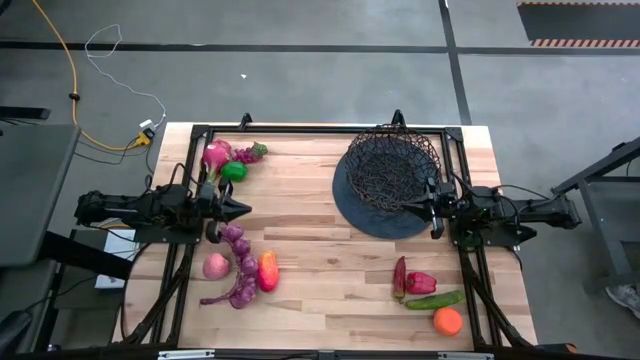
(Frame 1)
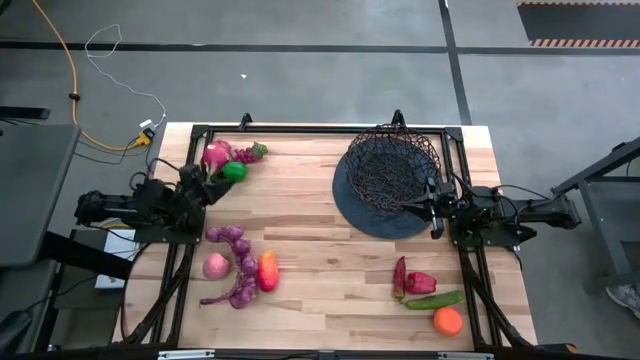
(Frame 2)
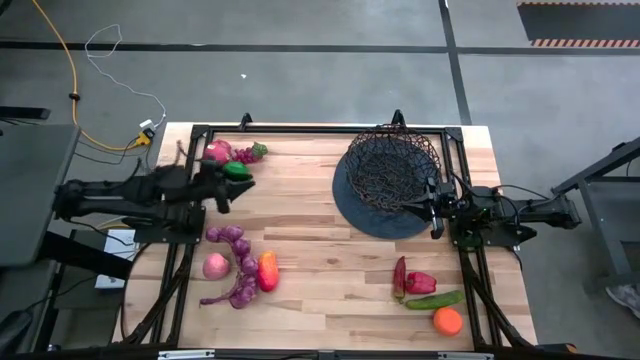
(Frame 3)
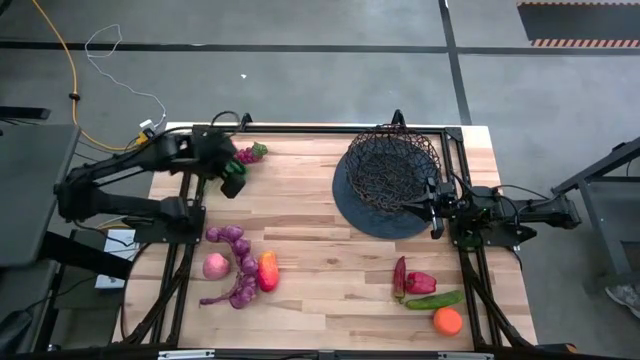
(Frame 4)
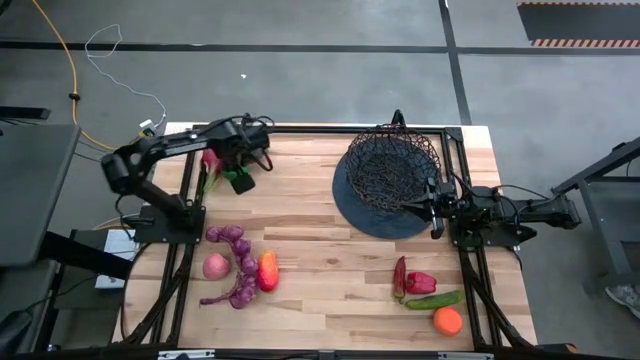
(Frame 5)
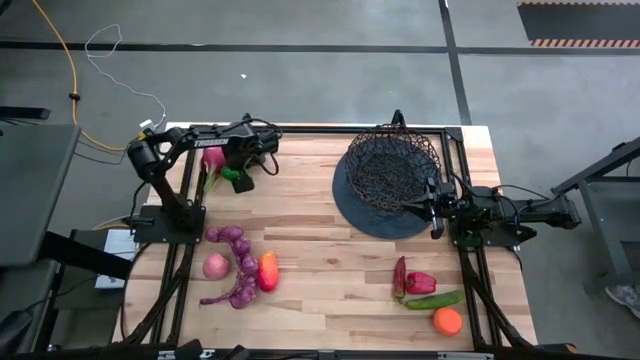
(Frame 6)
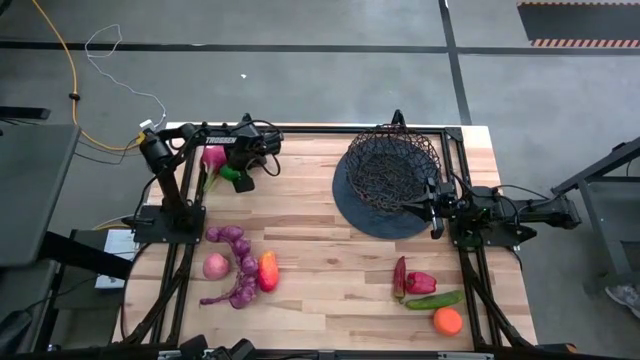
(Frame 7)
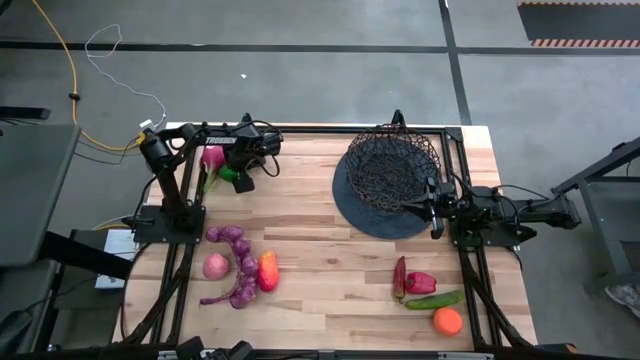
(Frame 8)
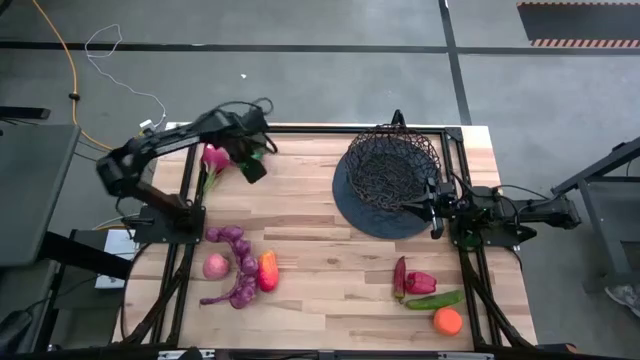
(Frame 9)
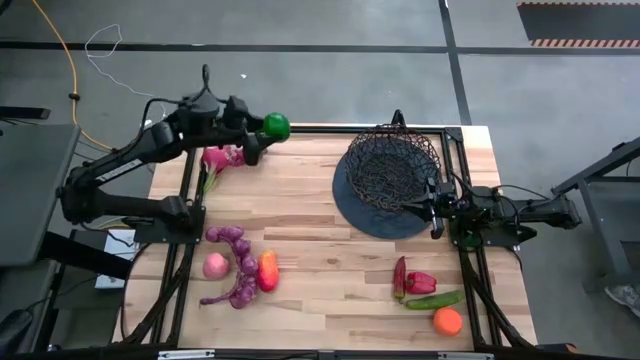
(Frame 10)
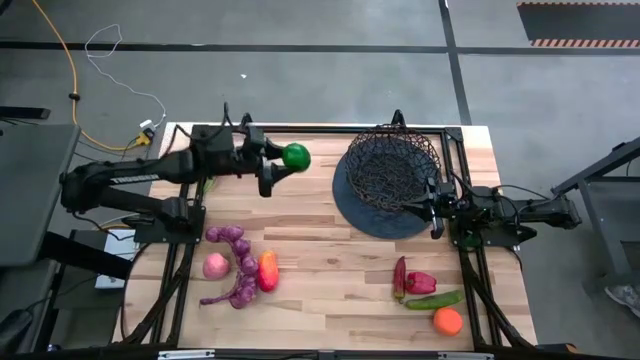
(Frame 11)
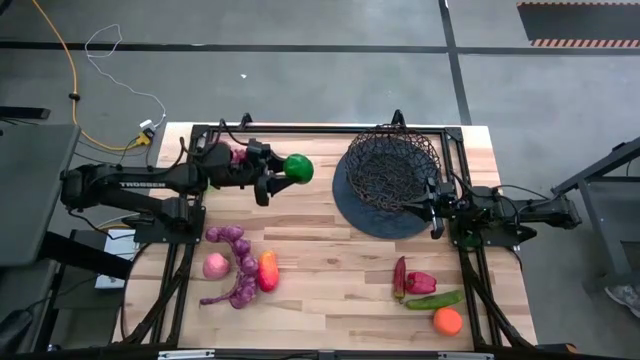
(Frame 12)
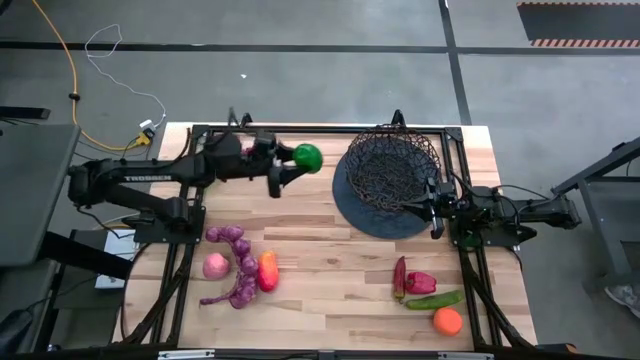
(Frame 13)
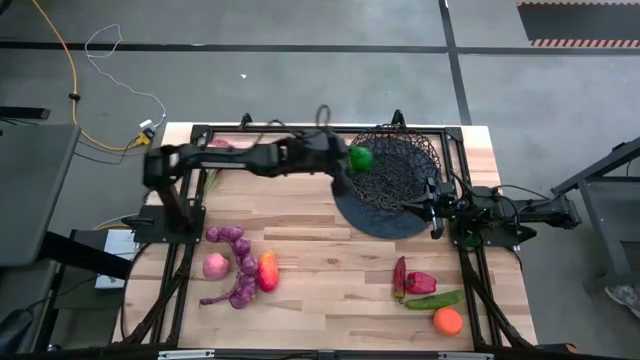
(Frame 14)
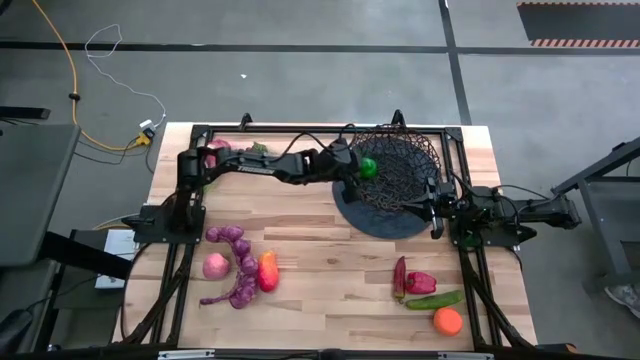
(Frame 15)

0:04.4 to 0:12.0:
Task: Build produce basket
Put the lime into the wire basket

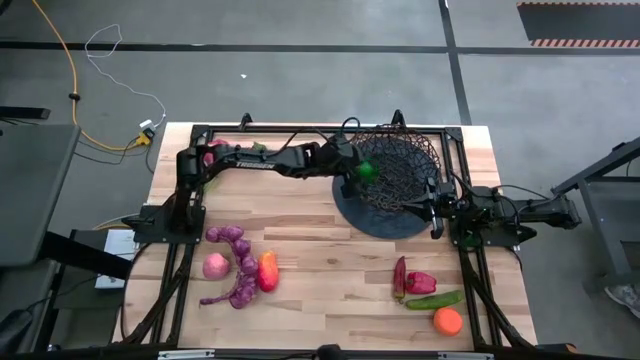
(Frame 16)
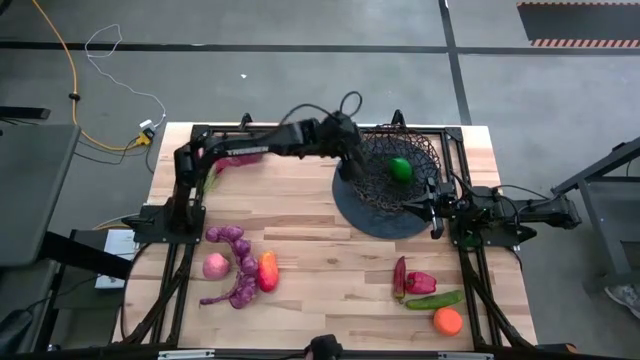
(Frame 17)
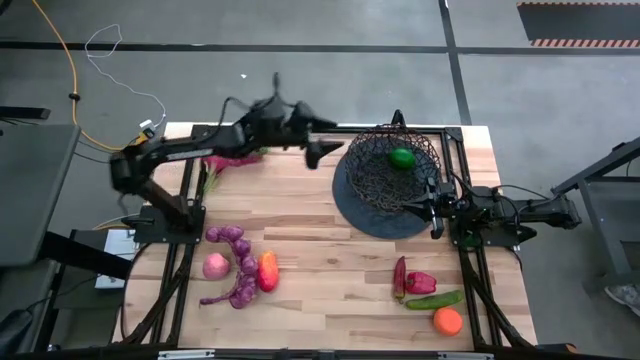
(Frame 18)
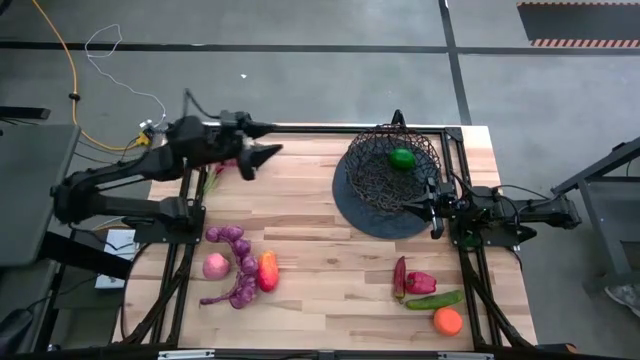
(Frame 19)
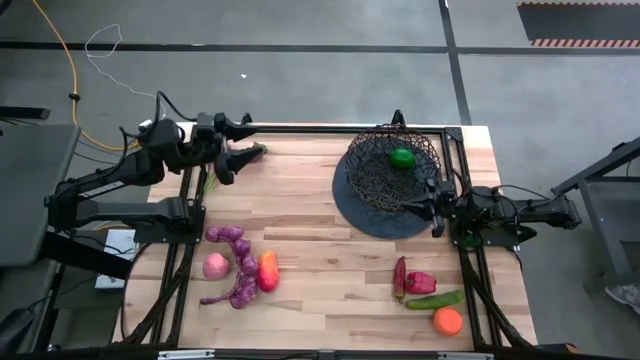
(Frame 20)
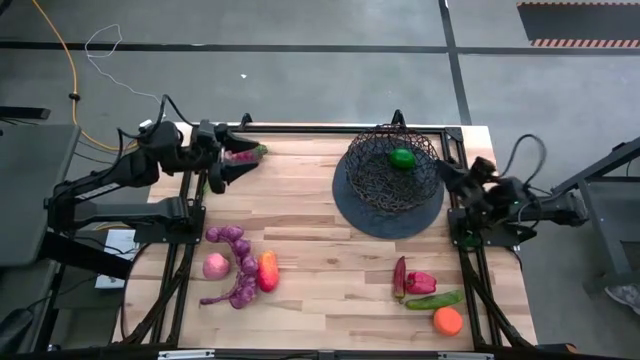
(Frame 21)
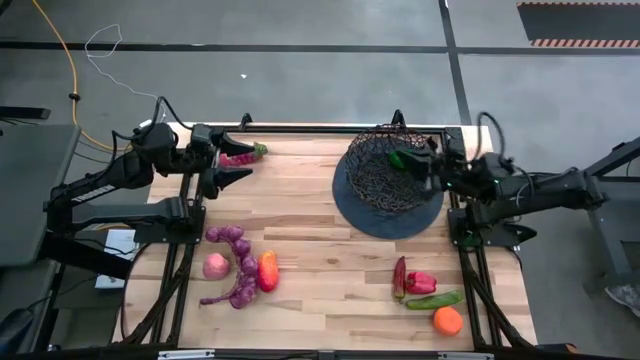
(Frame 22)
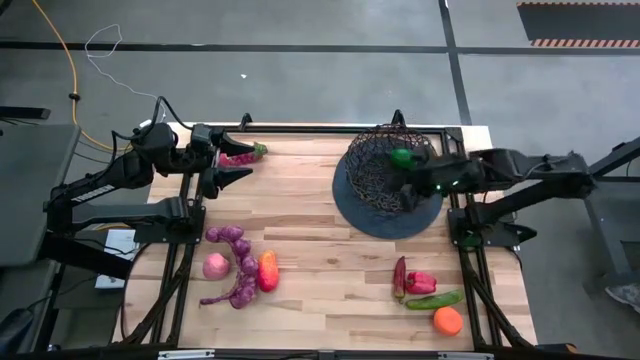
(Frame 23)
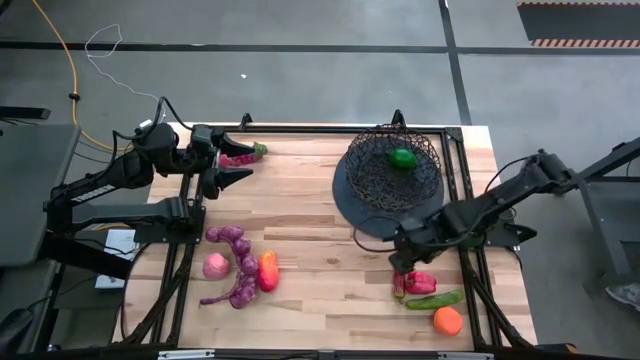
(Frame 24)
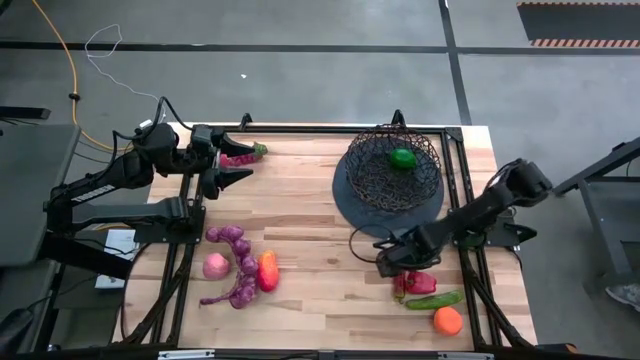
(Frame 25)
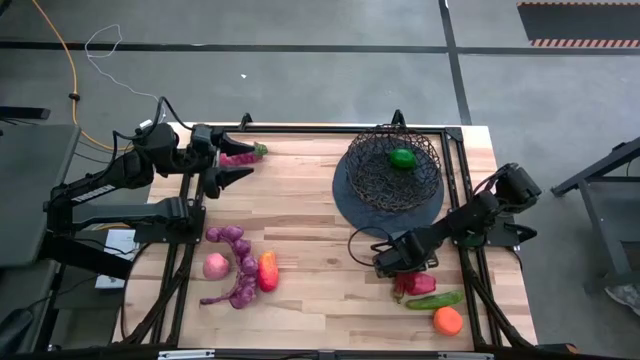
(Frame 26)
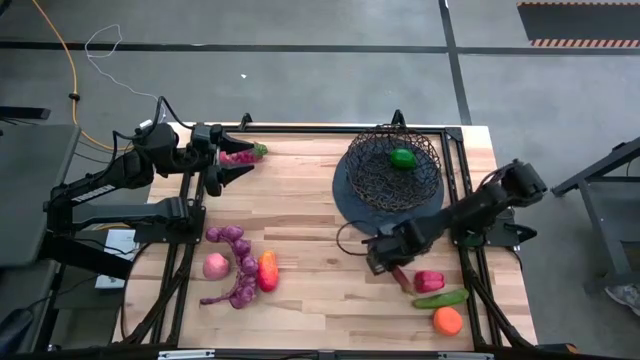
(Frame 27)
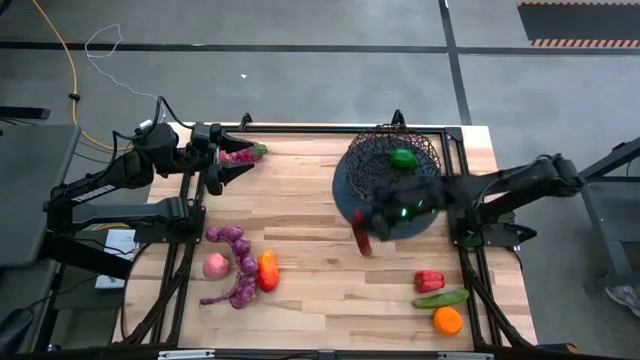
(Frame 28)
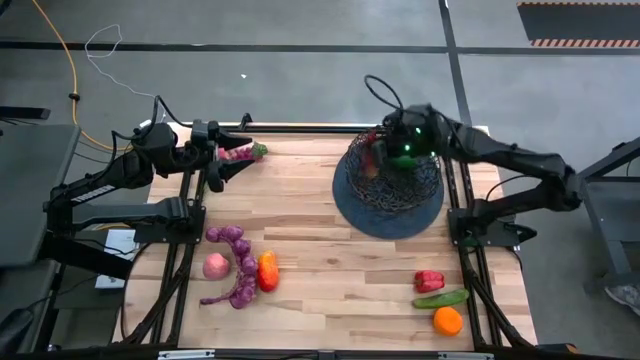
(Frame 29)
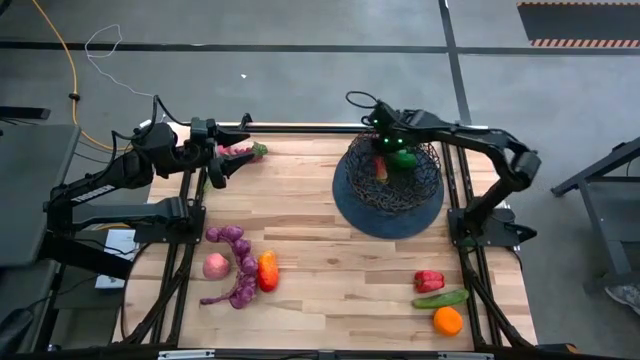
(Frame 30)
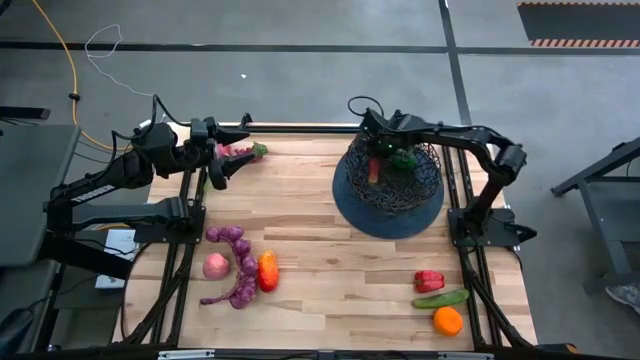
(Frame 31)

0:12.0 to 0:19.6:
Put the chili pepper into the wire basket

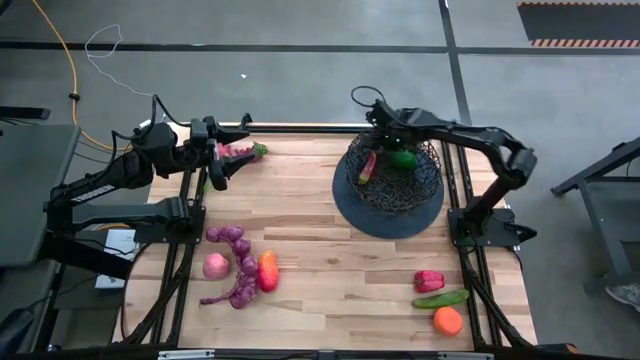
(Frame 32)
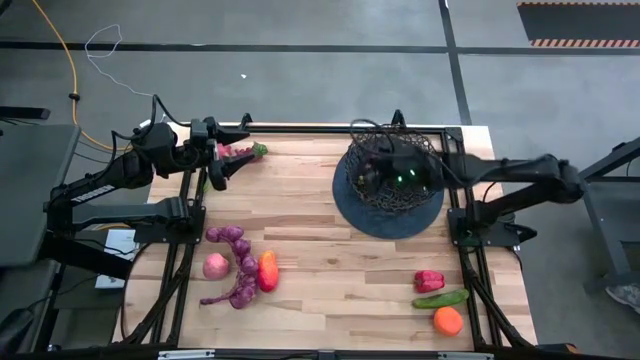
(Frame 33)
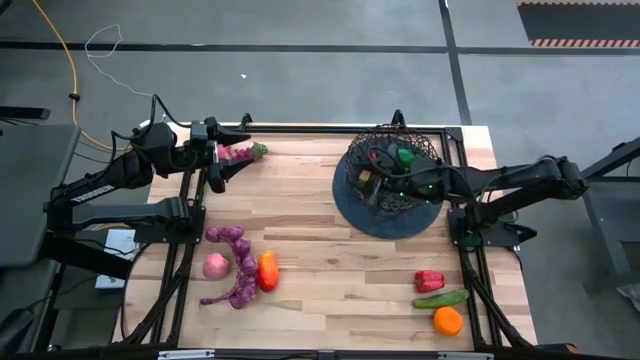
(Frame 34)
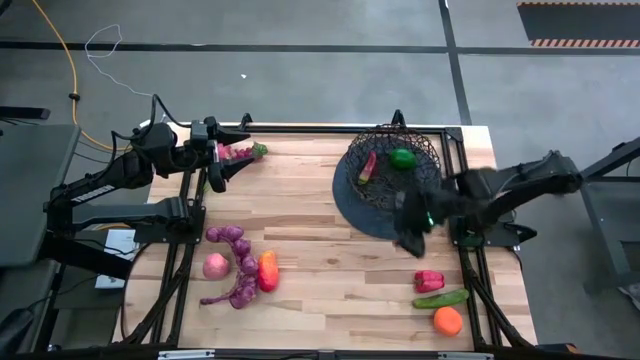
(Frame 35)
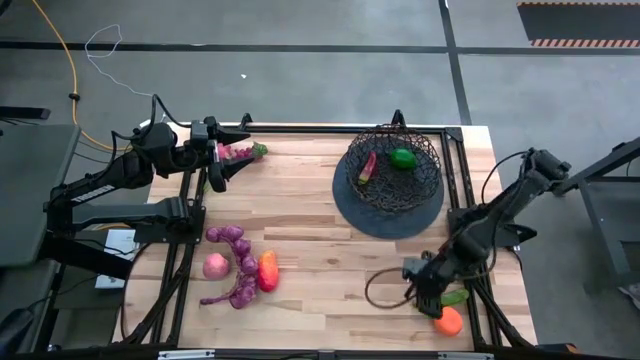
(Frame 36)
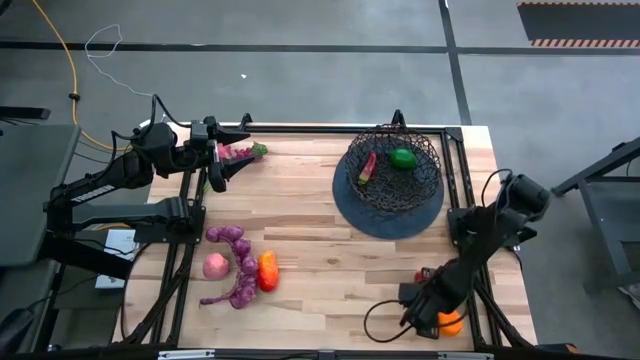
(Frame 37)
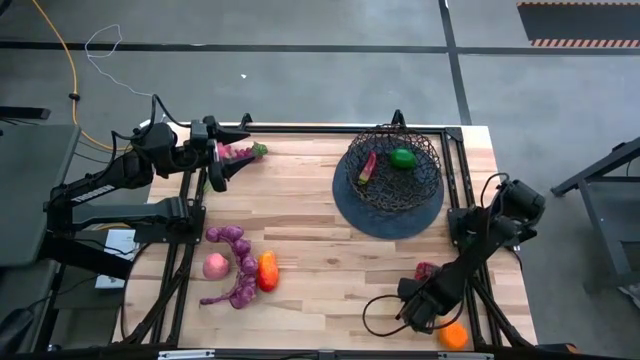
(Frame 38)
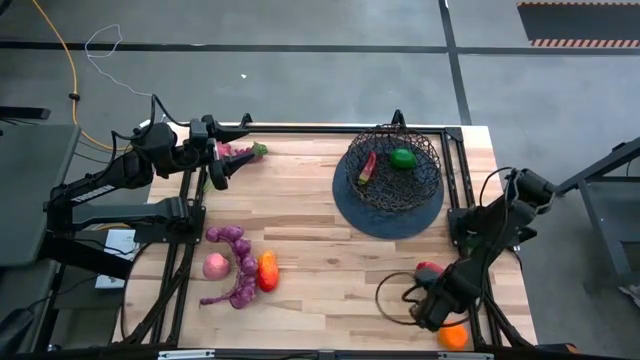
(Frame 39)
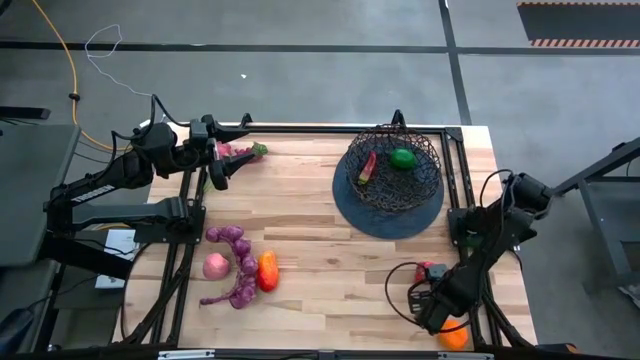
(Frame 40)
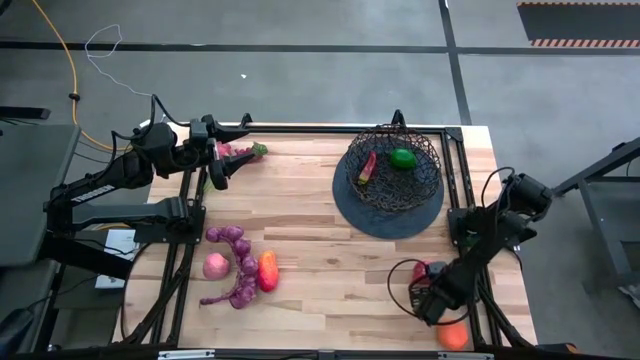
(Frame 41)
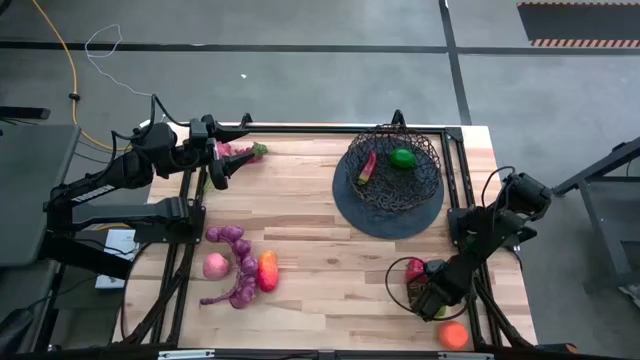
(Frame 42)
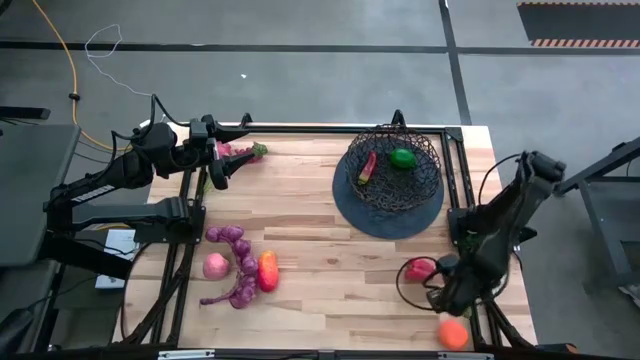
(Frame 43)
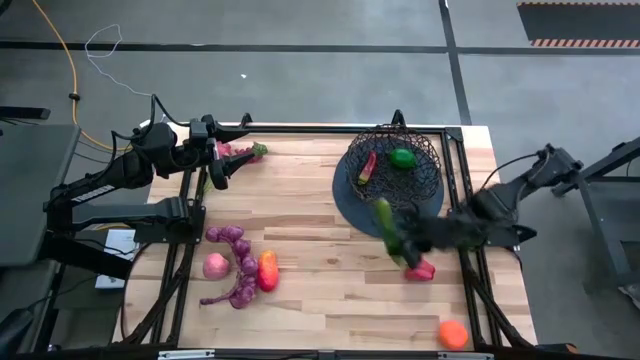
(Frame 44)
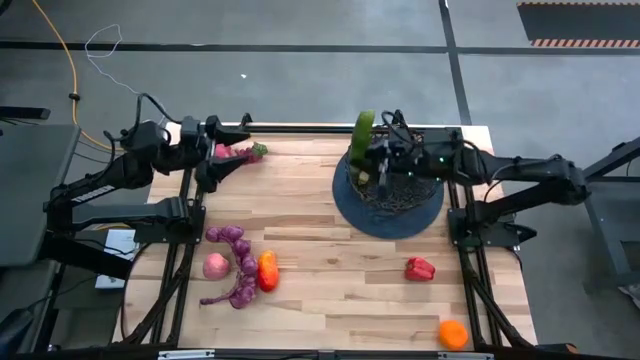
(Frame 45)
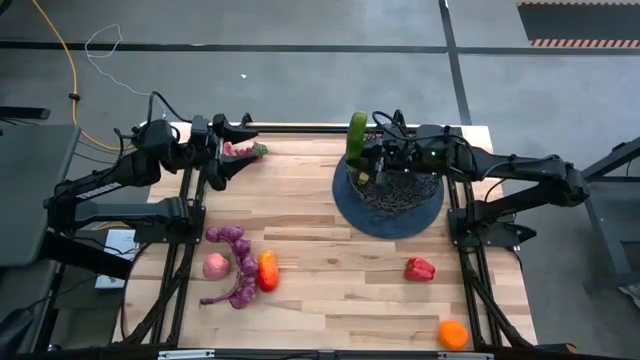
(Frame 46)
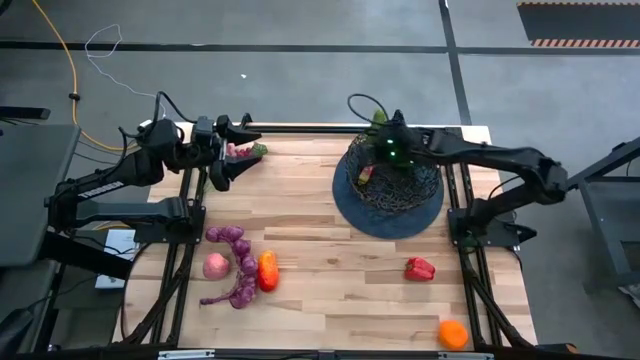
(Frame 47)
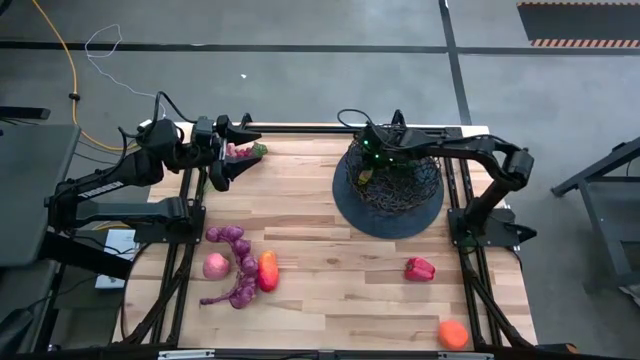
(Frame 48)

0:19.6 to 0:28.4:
Put the cucumber into the wire basket
